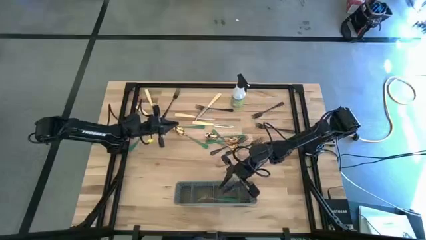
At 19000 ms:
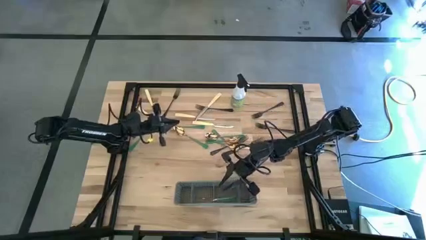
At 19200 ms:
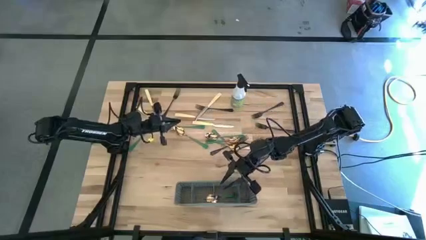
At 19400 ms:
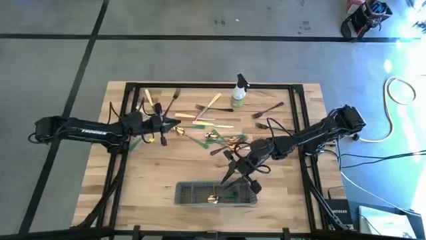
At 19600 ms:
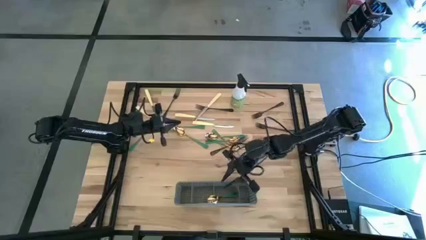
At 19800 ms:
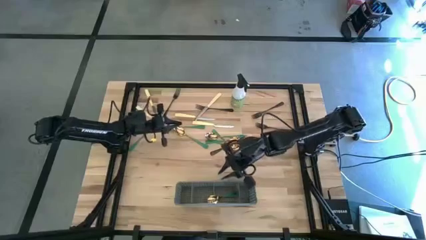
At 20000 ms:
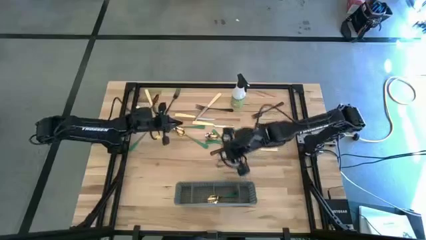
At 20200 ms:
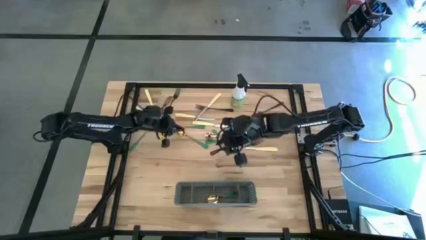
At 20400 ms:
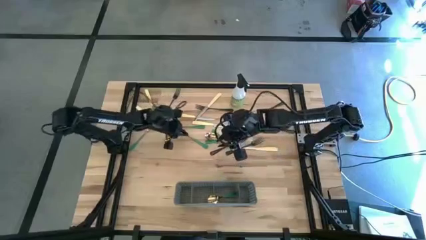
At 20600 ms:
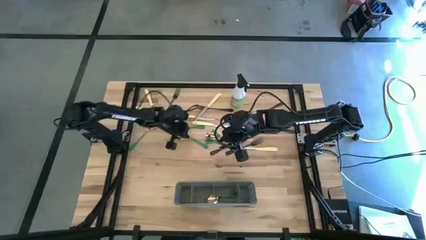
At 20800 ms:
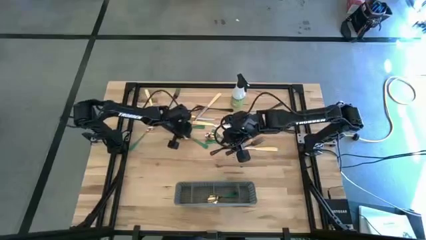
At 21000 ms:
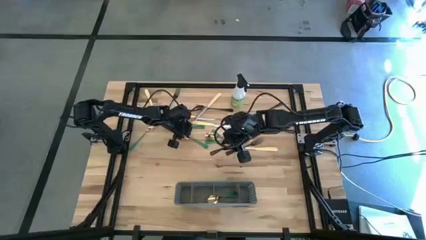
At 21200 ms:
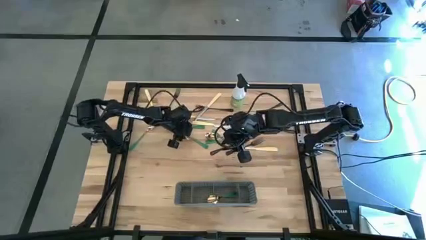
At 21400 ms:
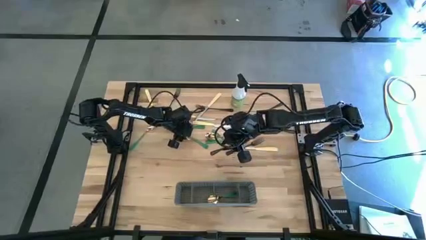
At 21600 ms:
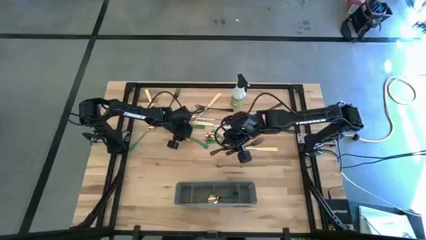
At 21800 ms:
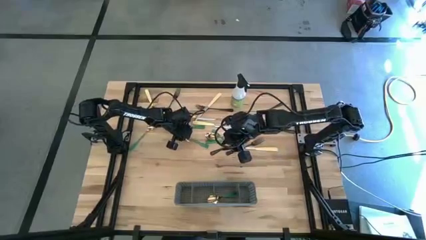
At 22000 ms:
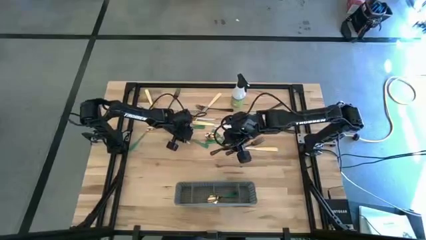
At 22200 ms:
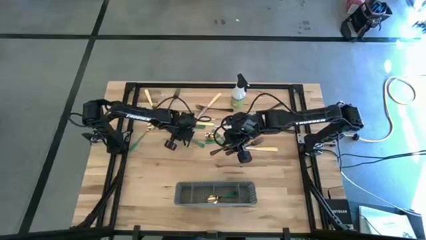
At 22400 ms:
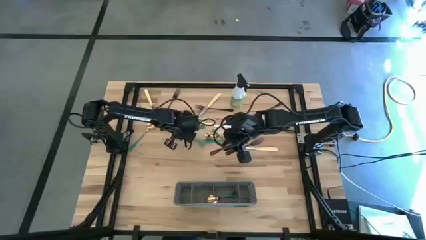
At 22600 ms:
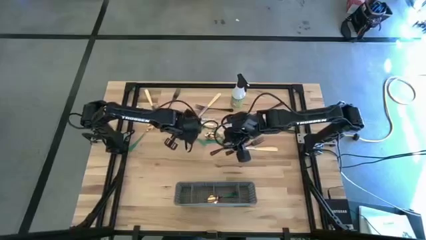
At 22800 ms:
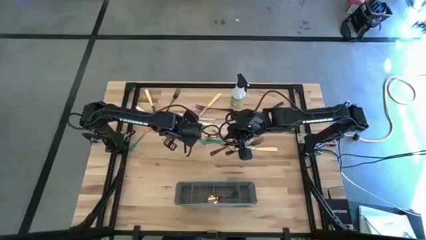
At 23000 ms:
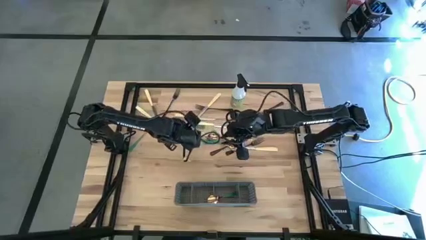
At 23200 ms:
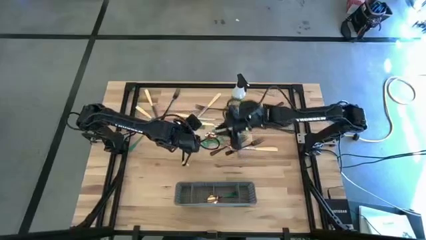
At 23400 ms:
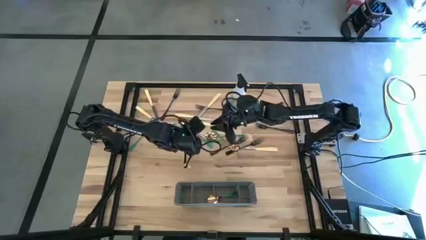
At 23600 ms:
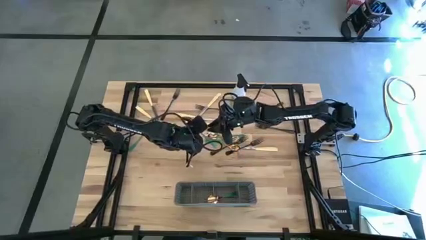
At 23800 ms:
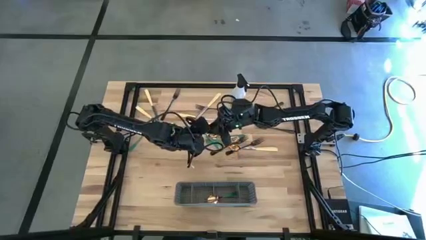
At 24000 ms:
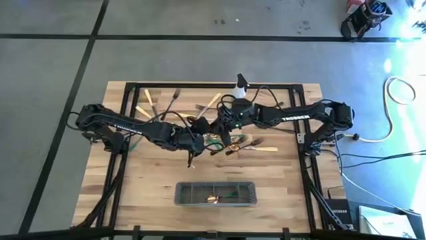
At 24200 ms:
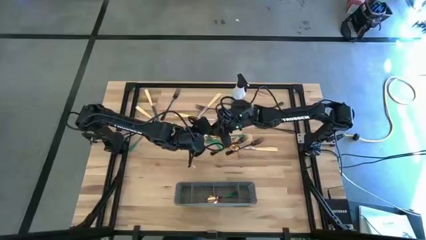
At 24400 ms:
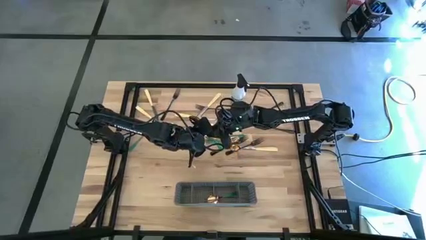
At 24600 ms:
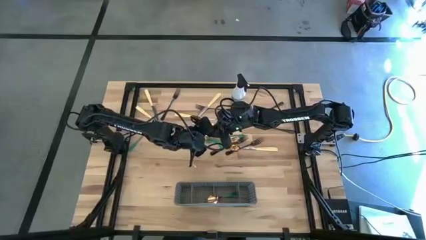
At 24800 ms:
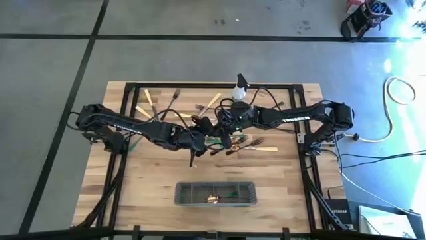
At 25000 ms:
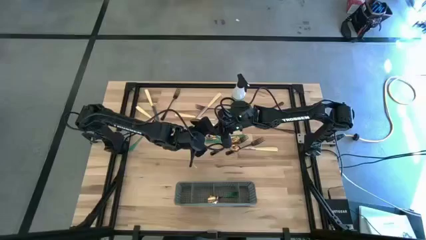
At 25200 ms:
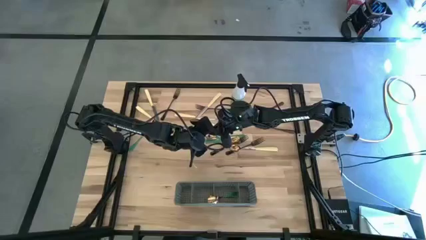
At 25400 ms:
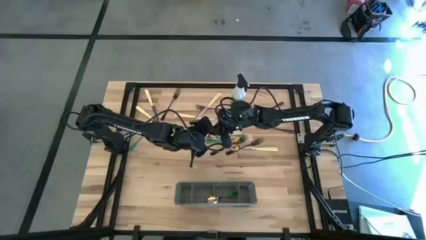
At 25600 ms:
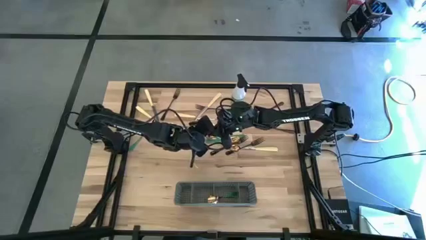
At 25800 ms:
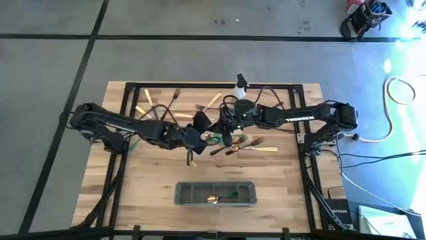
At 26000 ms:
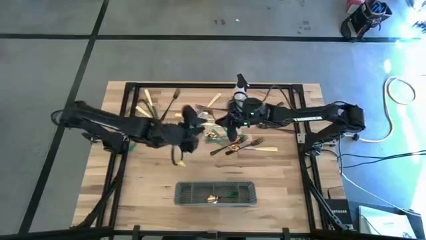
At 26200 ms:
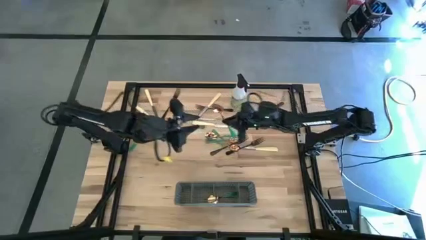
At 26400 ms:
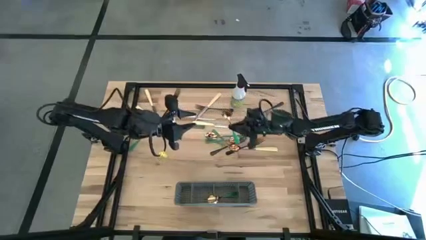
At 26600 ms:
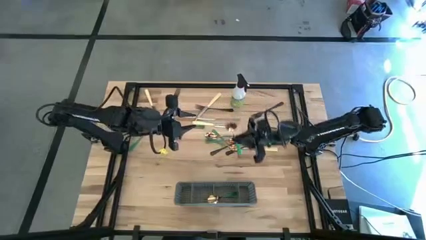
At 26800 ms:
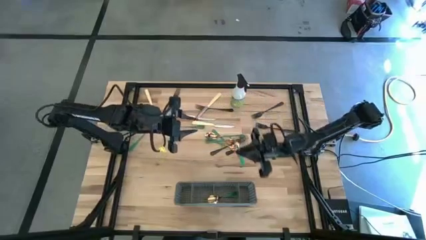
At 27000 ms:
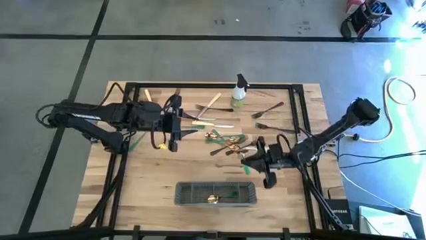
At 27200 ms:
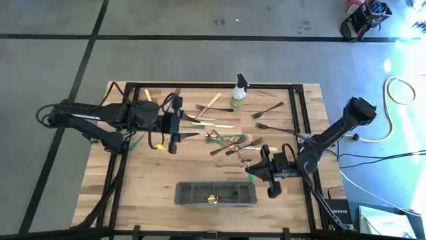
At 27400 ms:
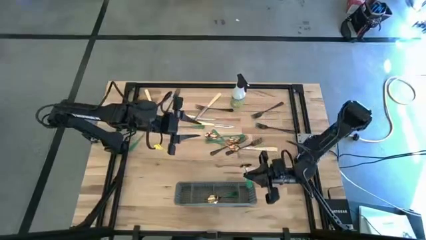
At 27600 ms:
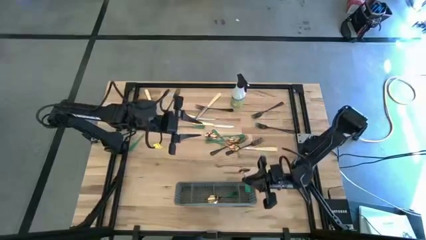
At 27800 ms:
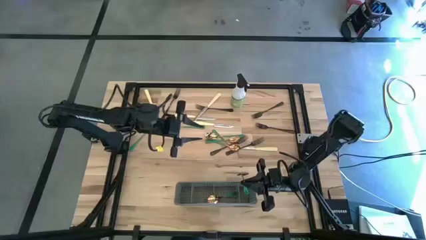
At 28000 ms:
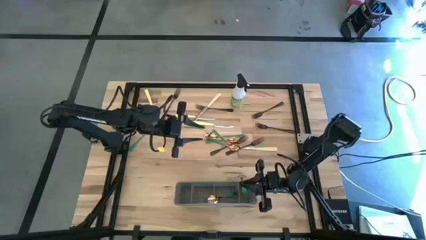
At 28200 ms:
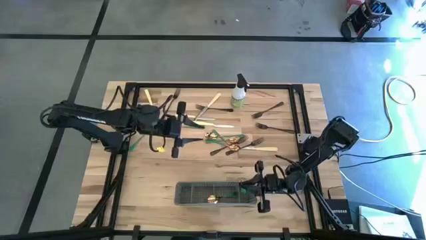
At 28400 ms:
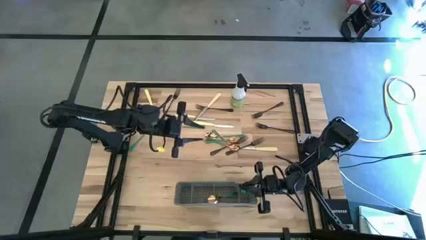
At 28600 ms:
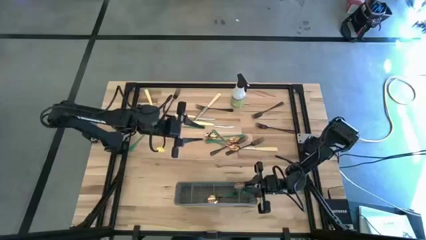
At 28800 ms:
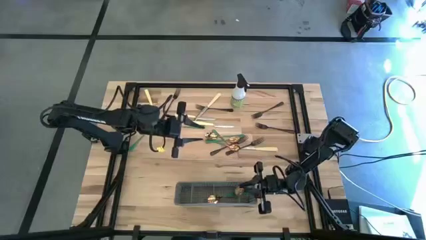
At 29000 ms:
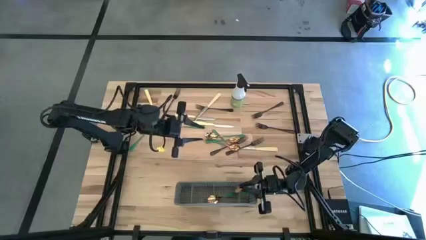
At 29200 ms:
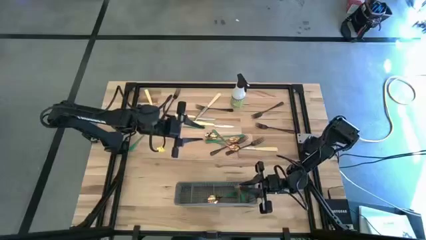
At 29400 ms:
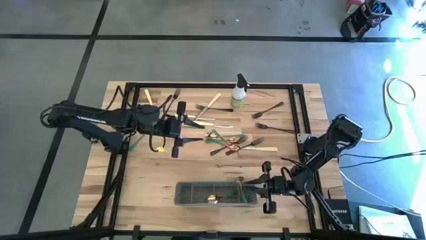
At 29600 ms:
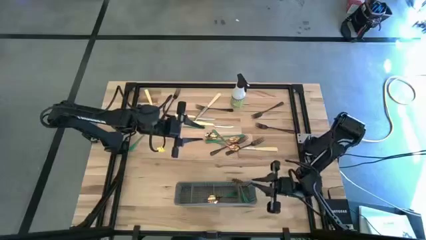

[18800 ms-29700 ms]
Task: Sort silverware
Put the middle green spoon into the gray cutlery rack
